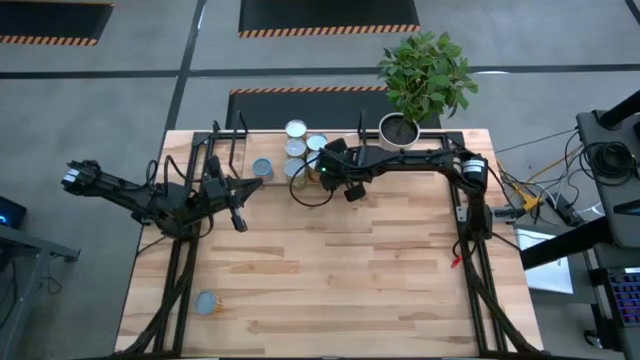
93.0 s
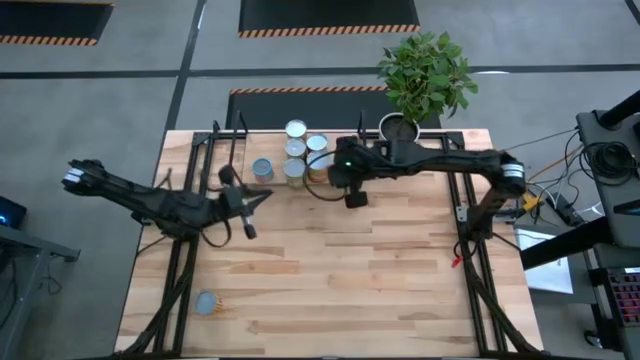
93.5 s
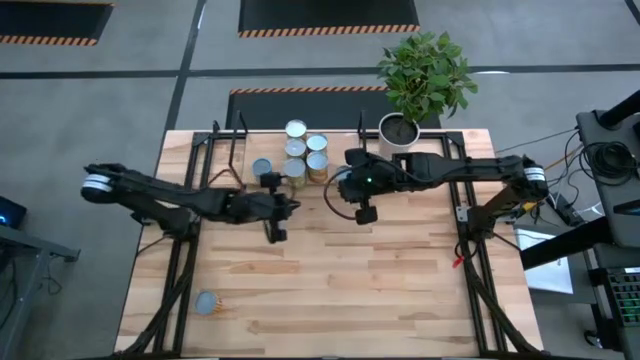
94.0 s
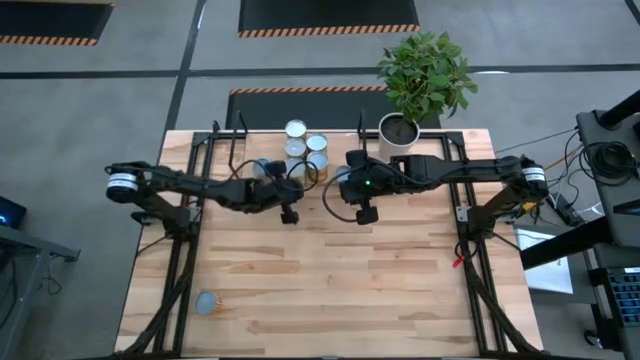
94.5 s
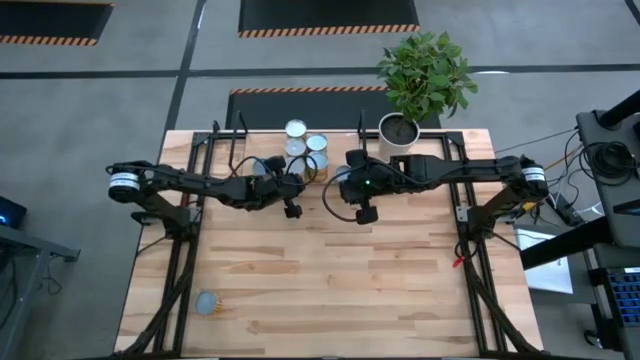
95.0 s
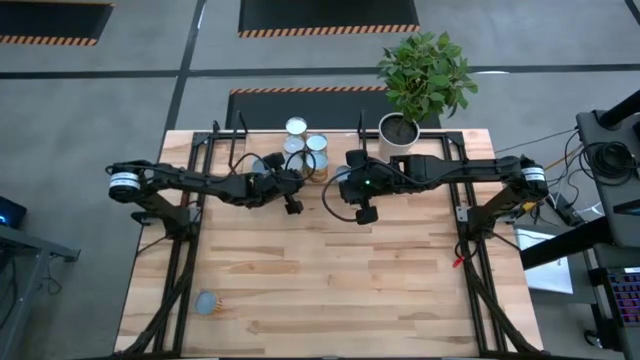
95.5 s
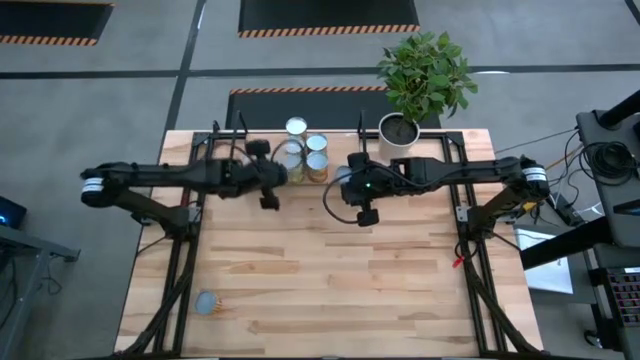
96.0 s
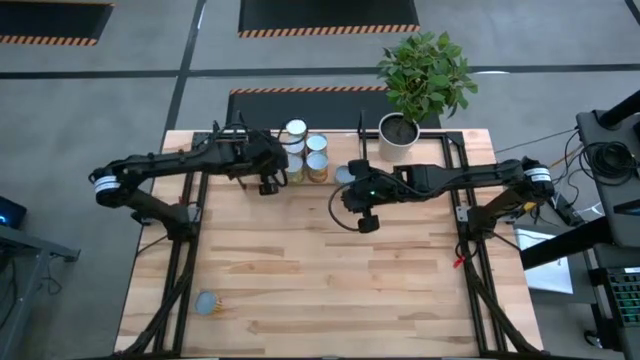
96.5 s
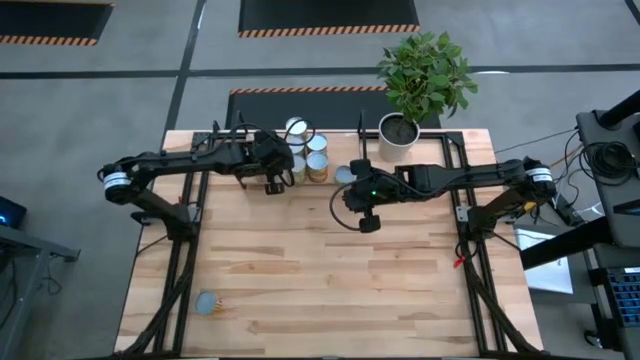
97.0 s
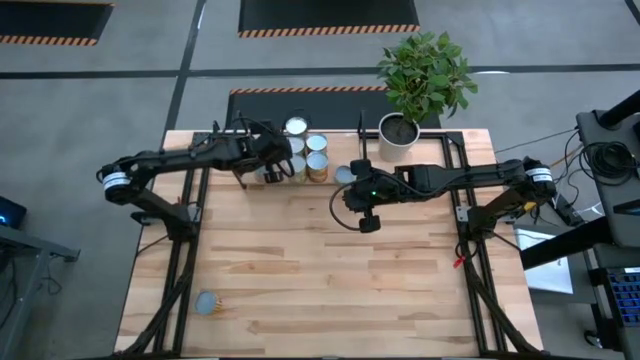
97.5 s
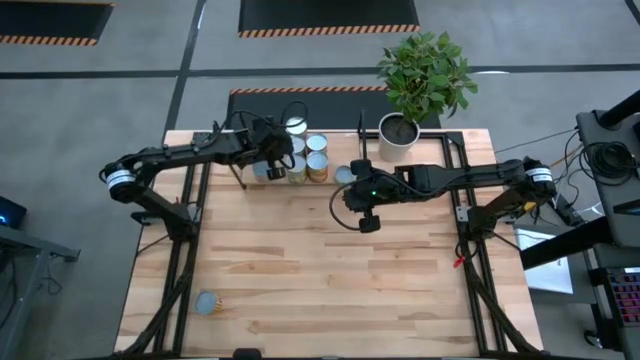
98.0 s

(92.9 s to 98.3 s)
Task: Pick and place cans onto a shelf
Adjust the cans on the shelf

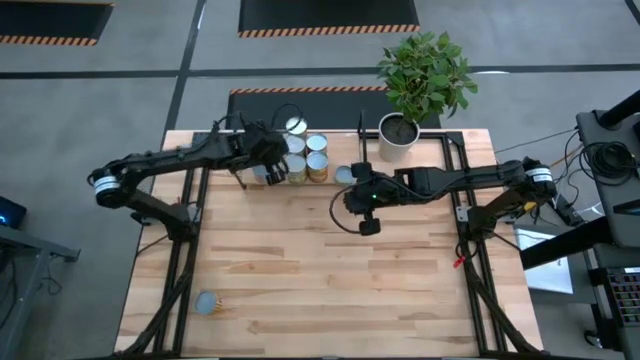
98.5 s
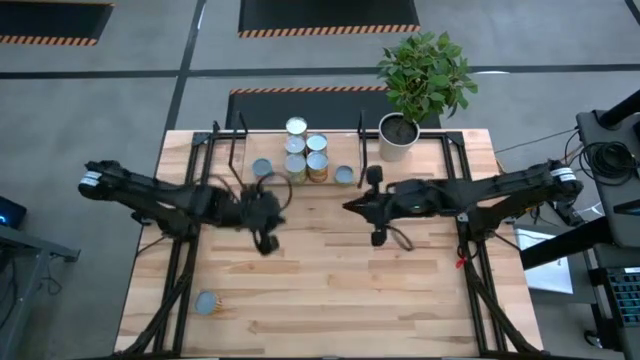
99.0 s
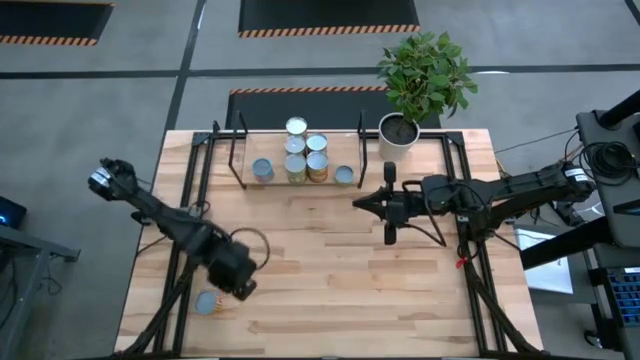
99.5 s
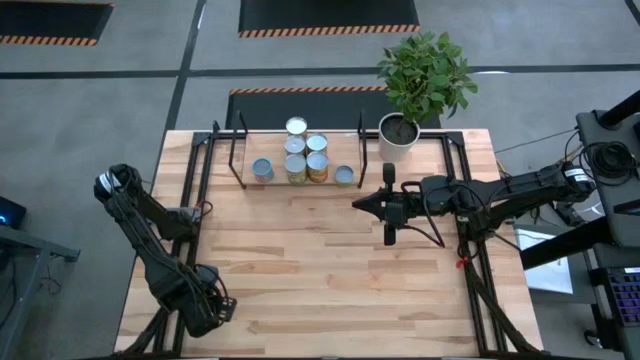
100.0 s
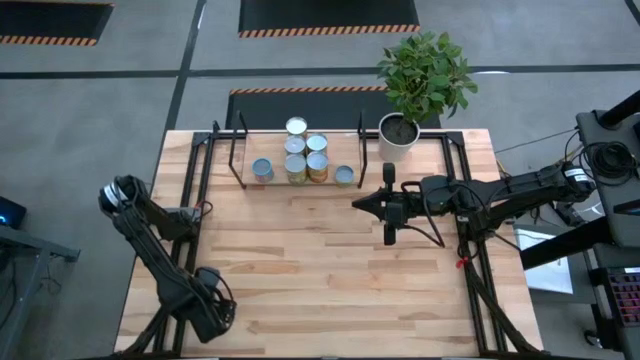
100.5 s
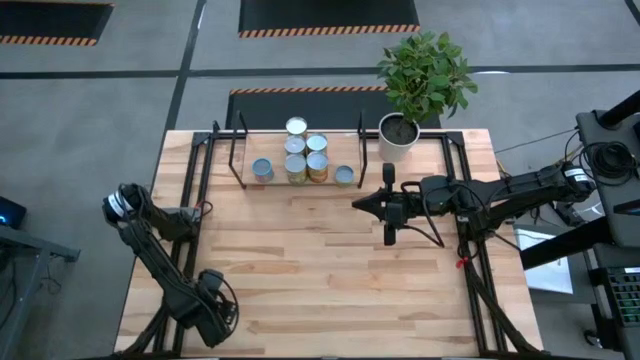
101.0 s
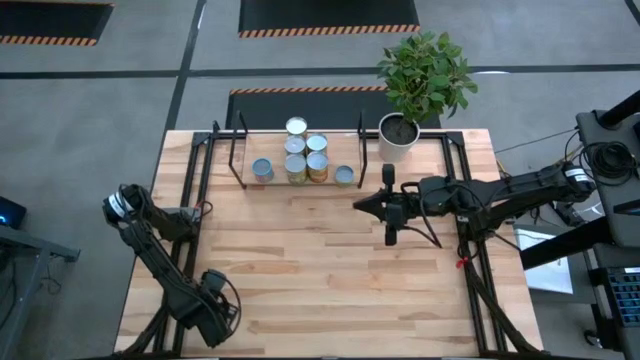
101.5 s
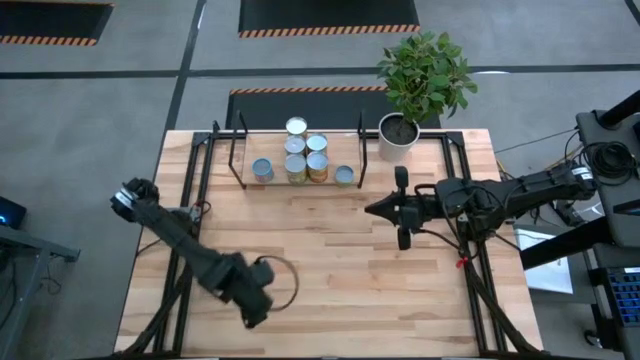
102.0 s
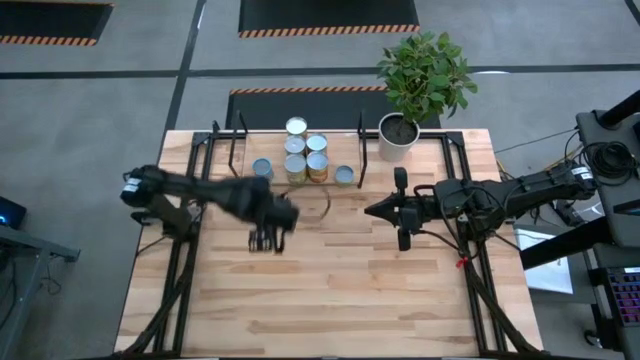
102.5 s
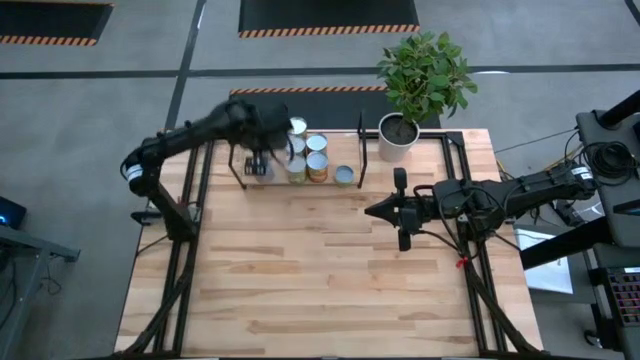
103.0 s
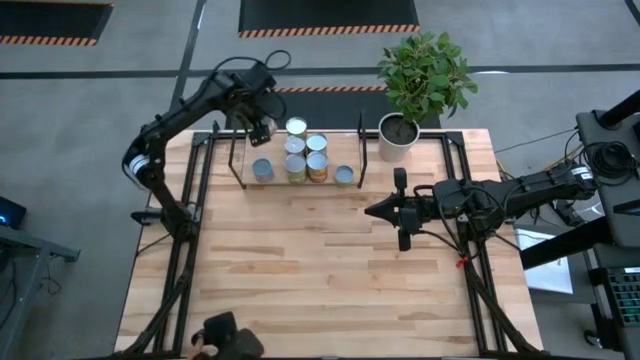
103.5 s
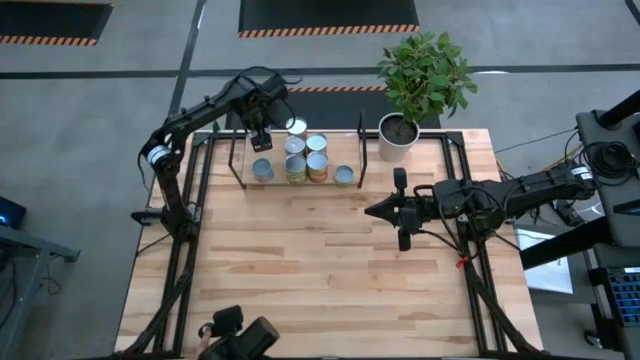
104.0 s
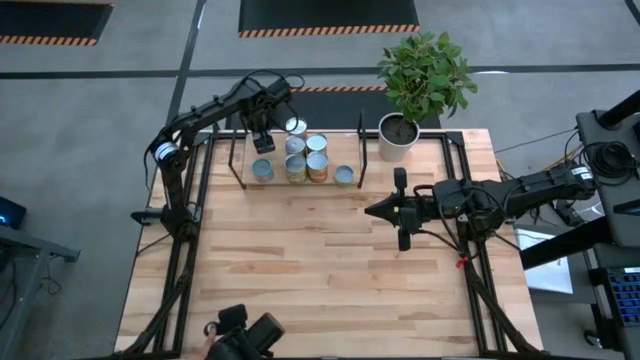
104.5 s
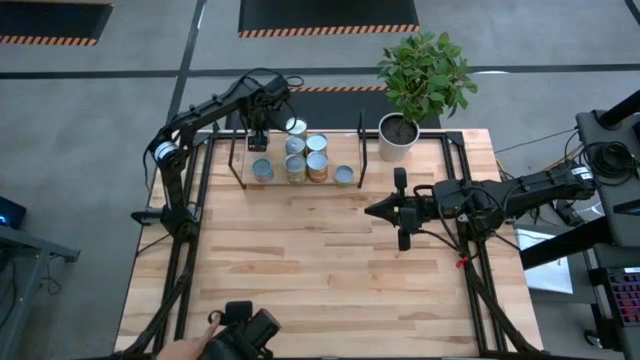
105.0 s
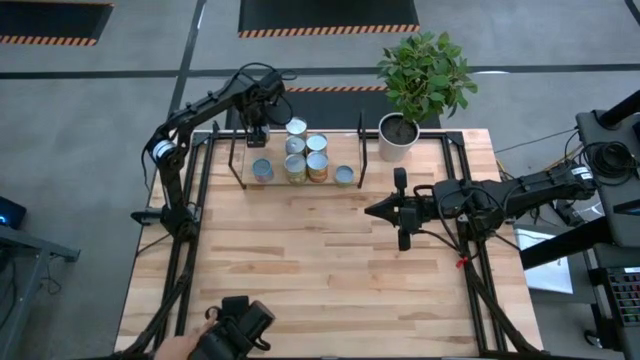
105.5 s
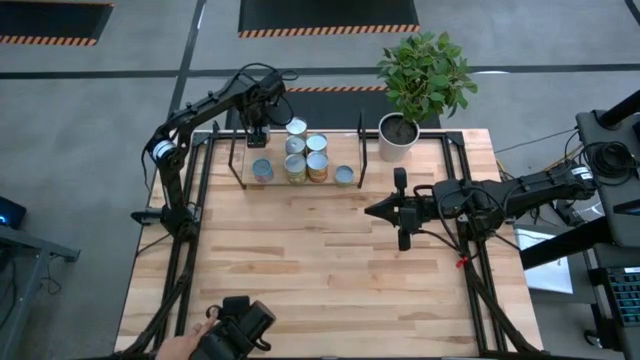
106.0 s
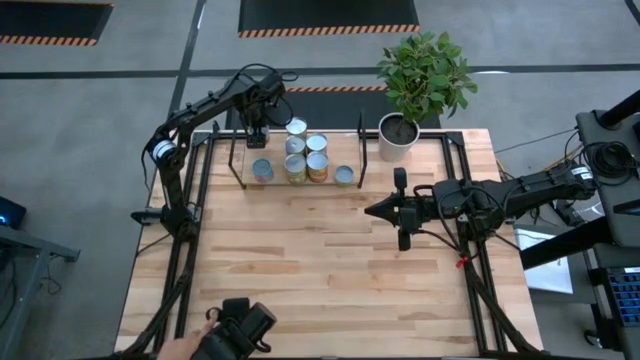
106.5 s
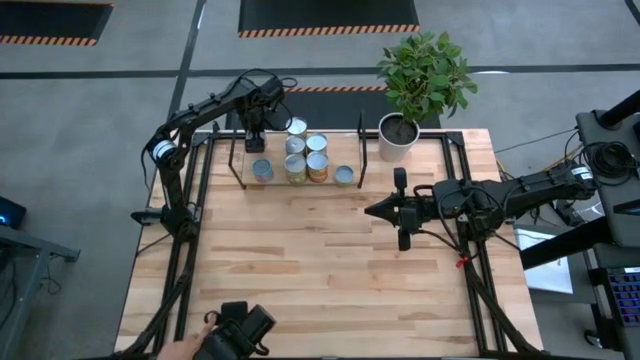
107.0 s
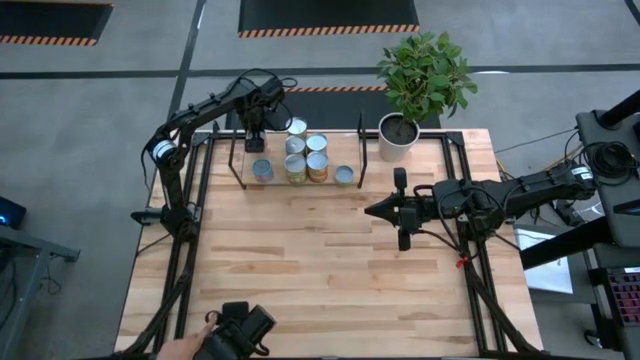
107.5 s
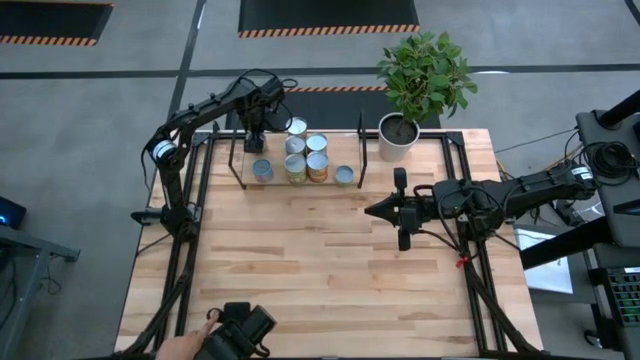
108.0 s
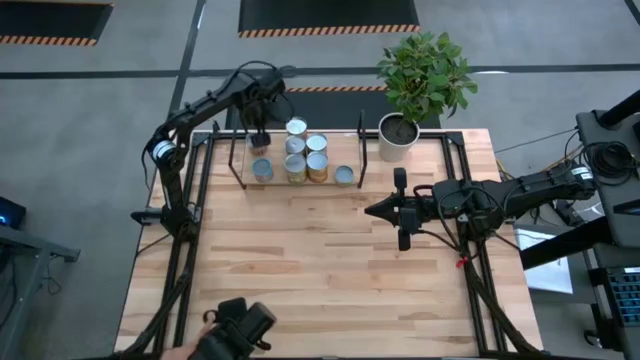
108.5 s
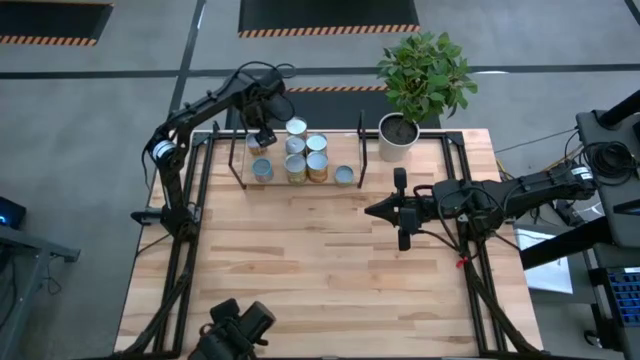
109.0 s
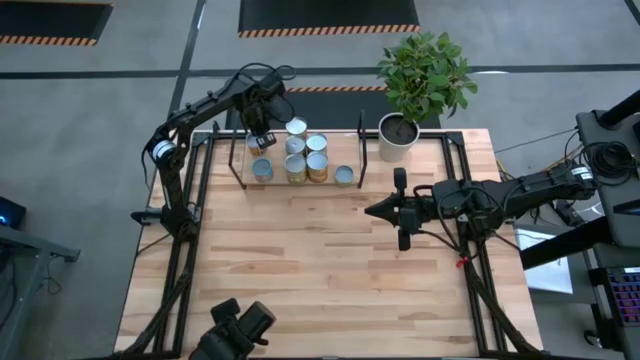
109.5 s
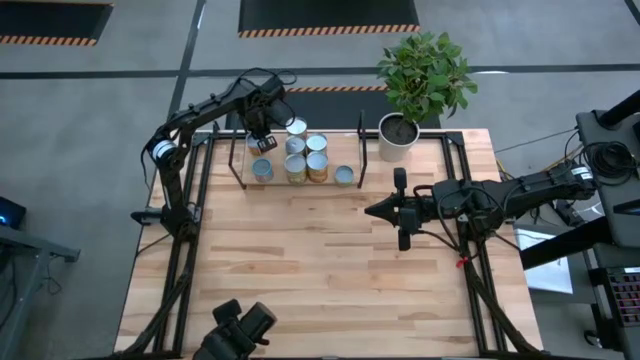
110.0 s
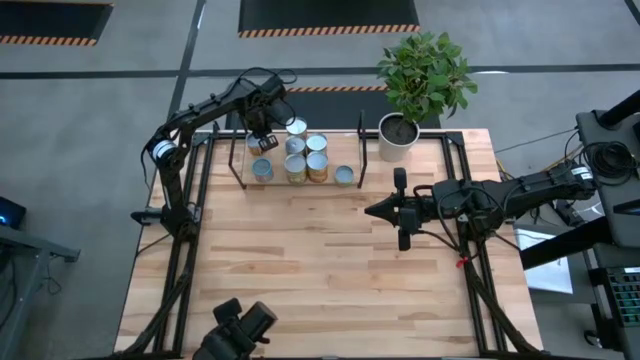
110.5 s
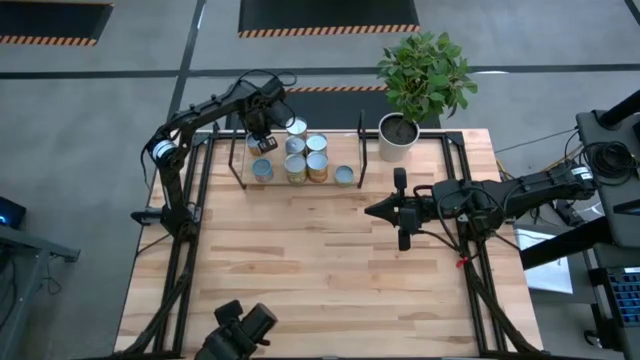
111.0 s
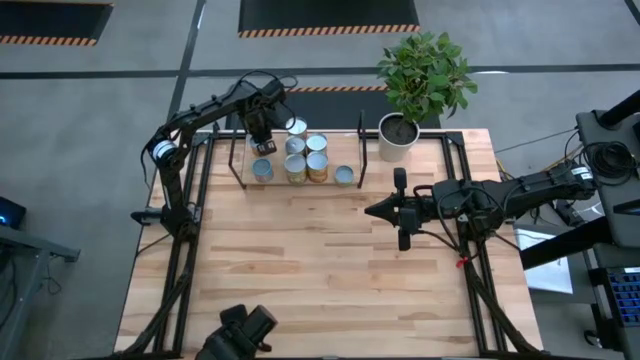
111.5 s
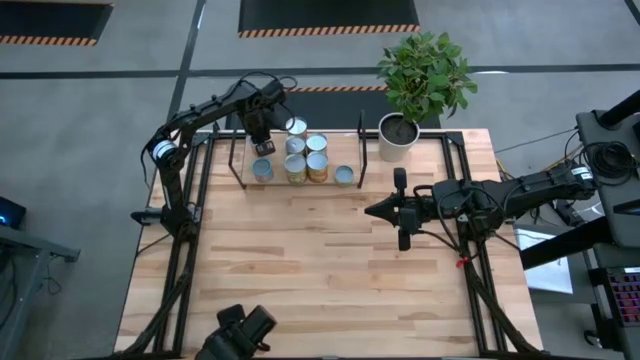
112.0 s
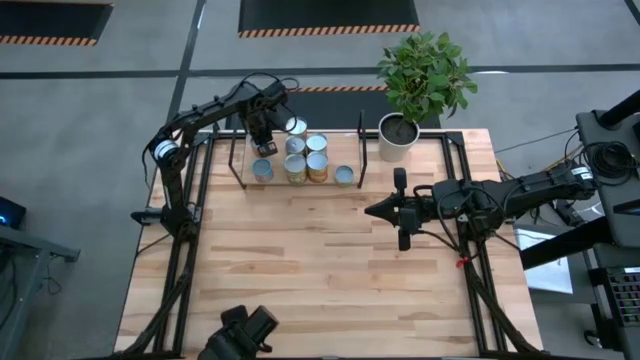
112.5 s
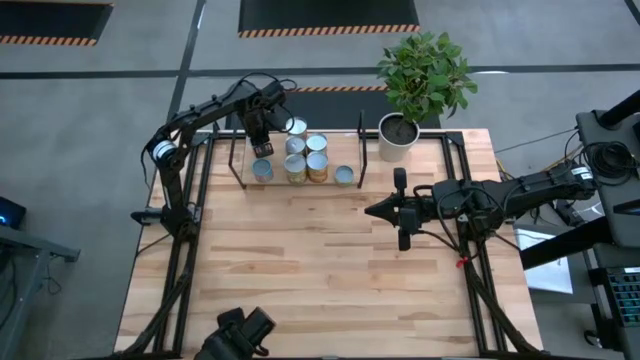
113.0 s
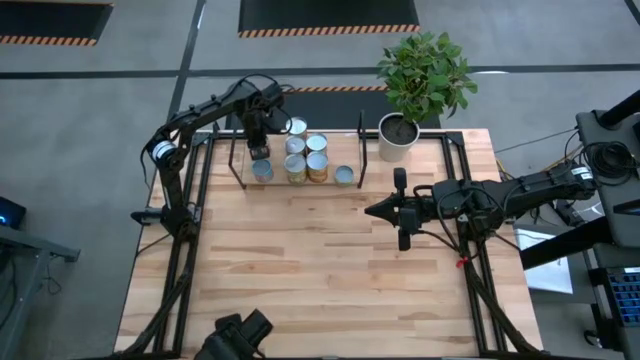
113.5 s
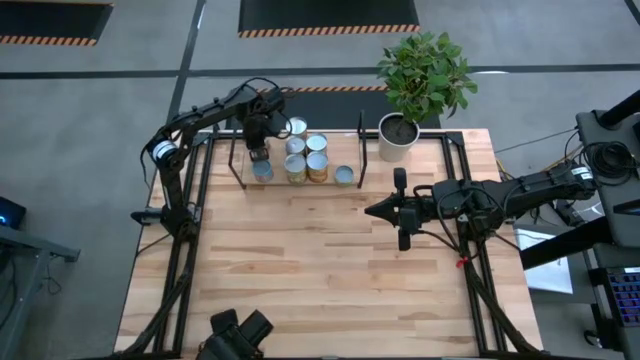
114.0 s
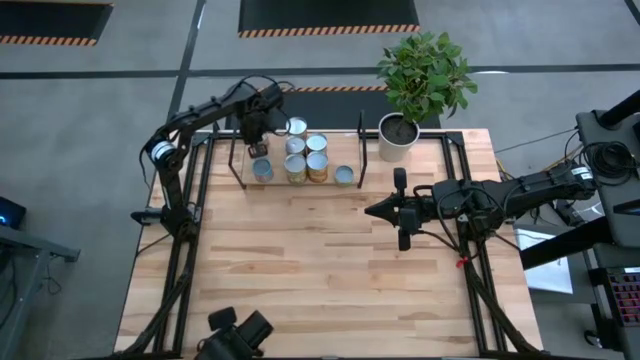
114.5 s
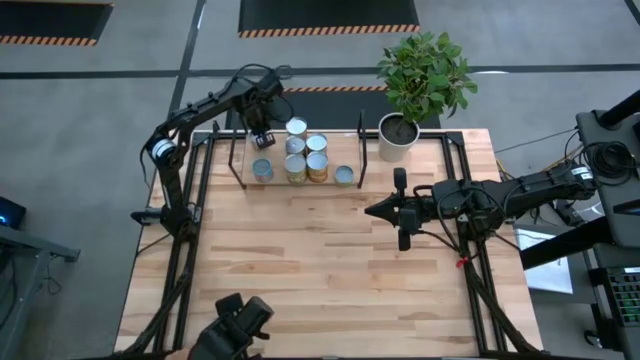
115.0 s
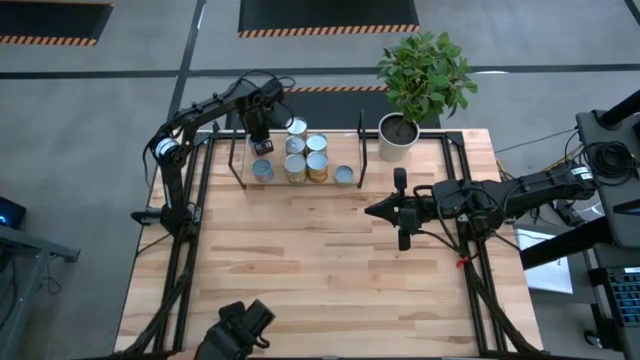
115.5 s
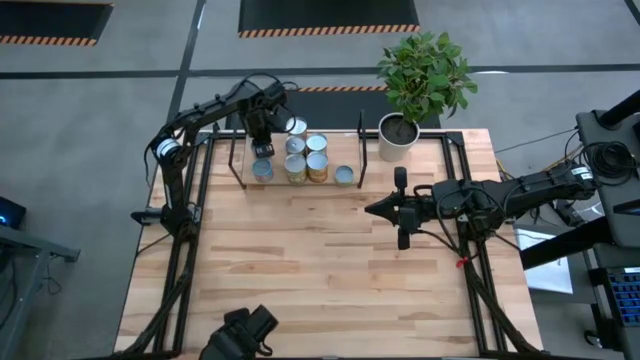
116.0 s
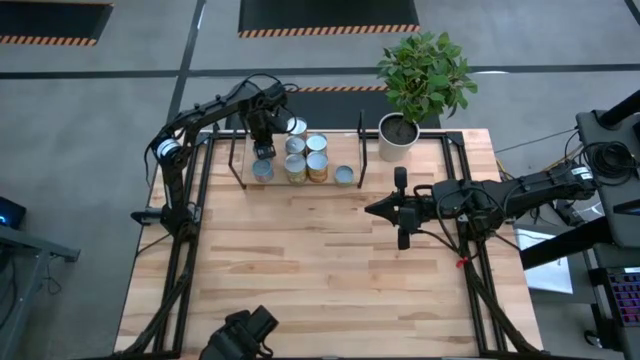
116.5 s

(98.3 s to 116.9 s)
Put the canned spices on the shelf
